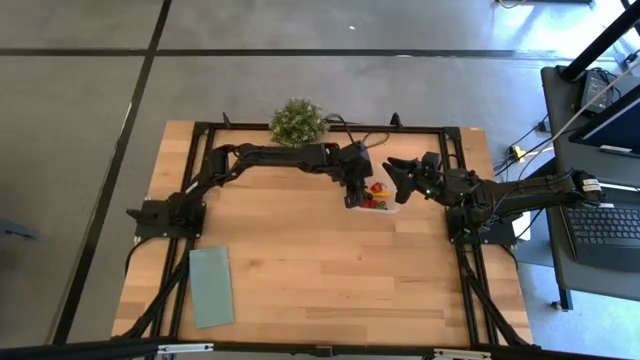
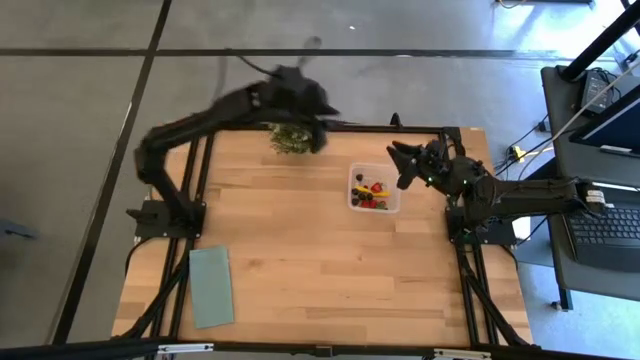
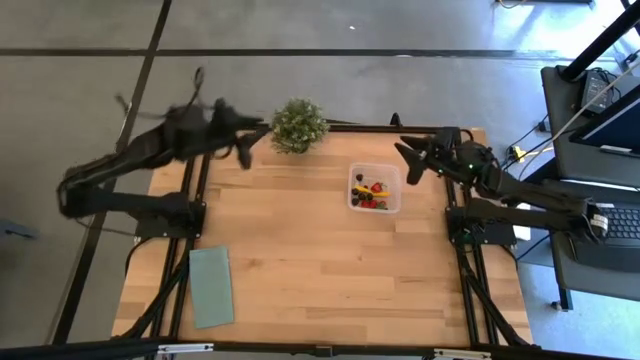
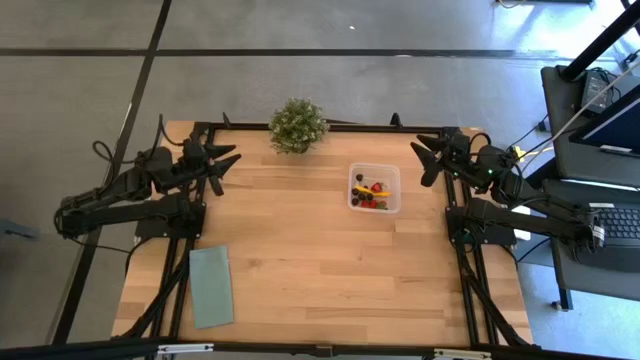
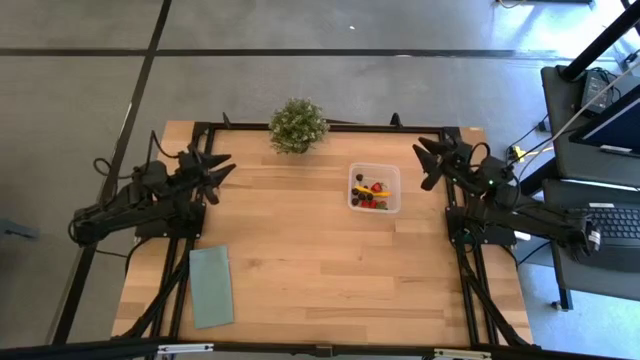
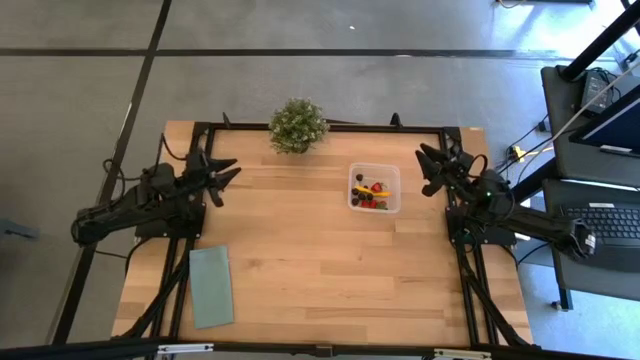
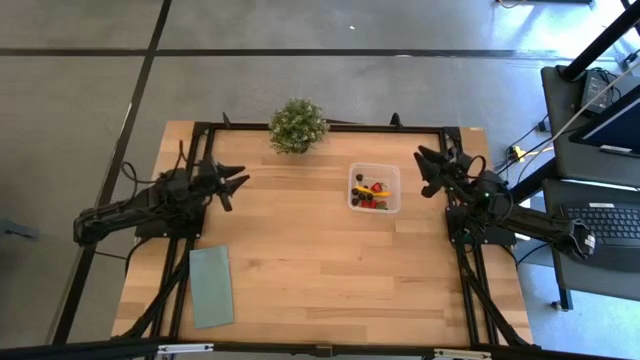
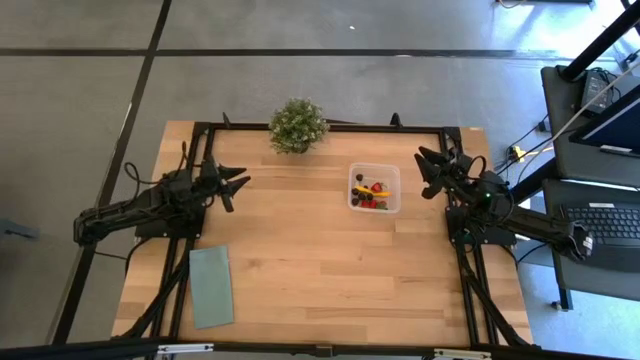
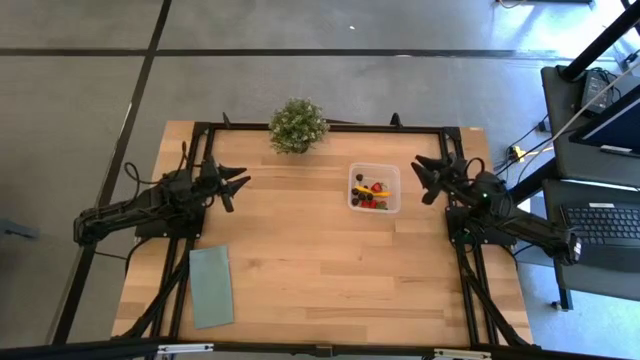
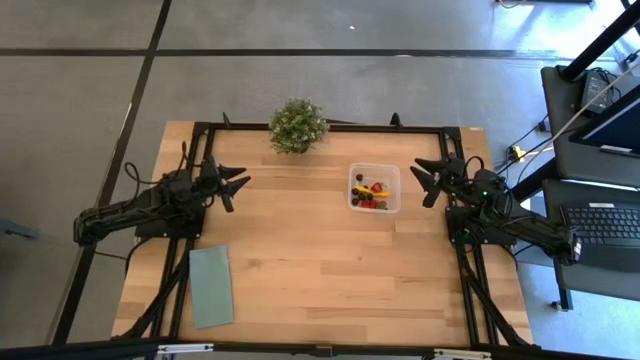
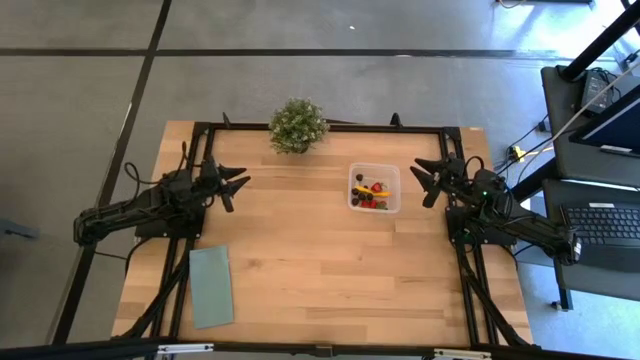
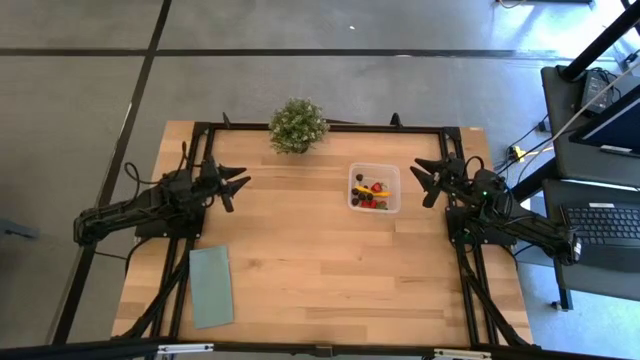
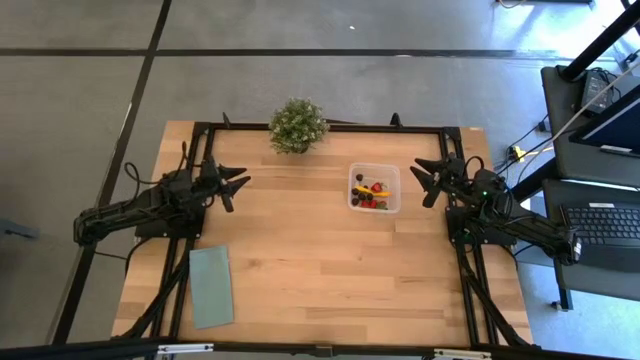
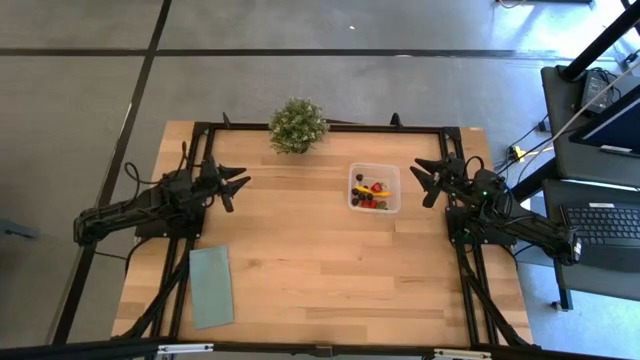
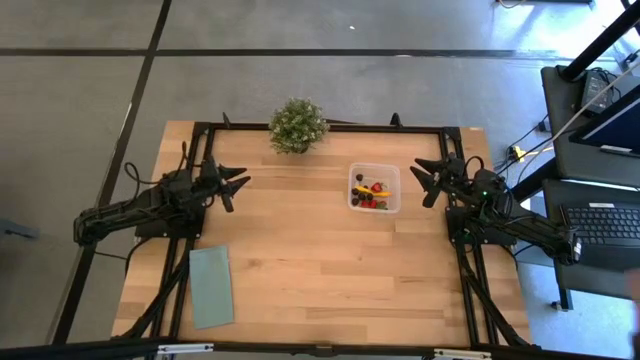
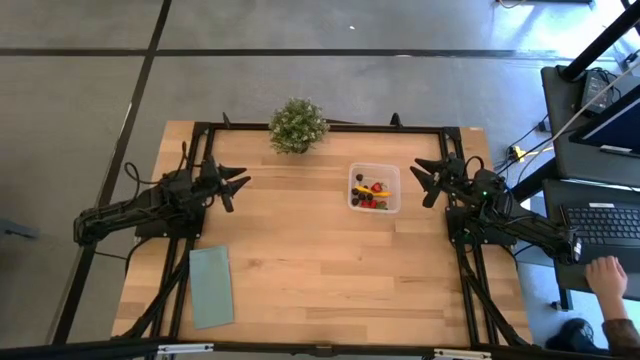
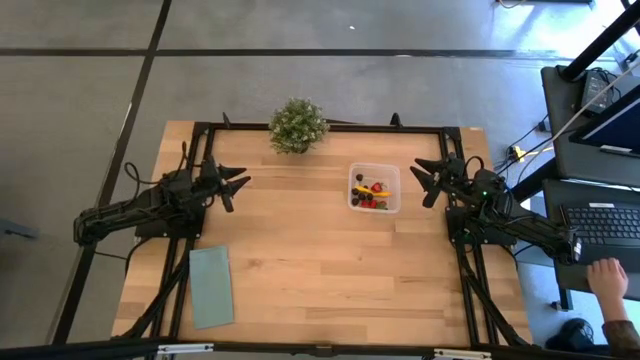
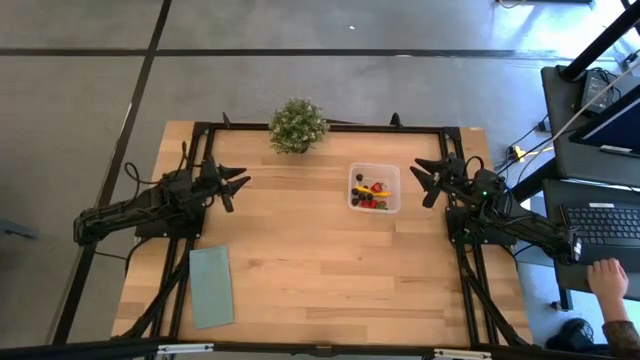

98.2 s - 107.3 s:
Task: Pick and placing Produce into tupperware
Return to Home Position

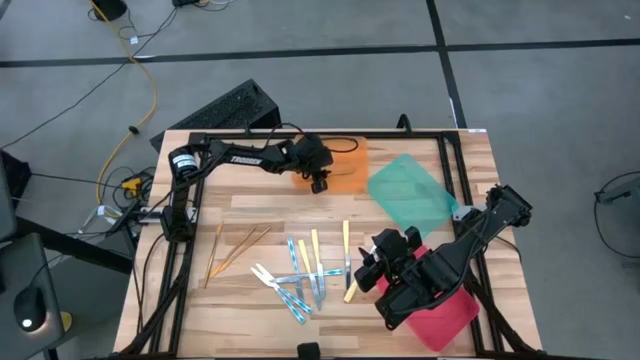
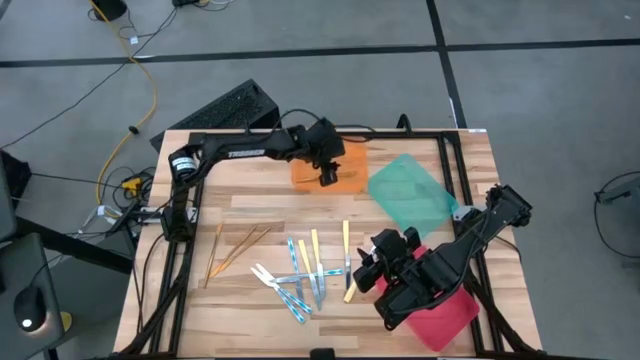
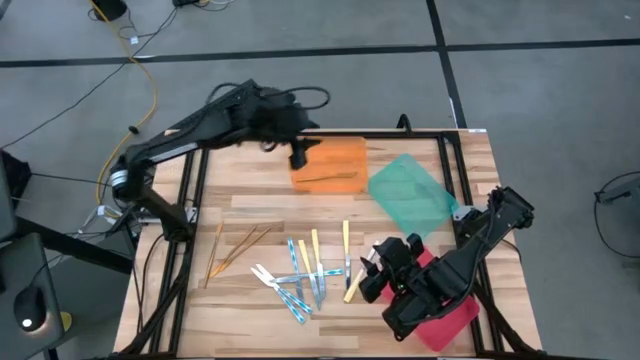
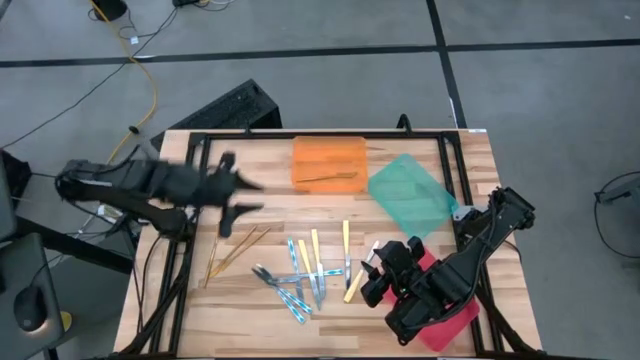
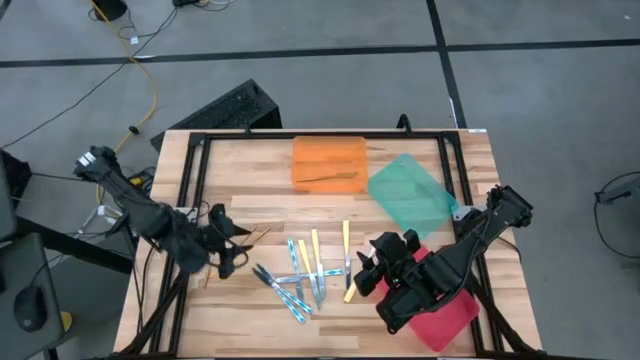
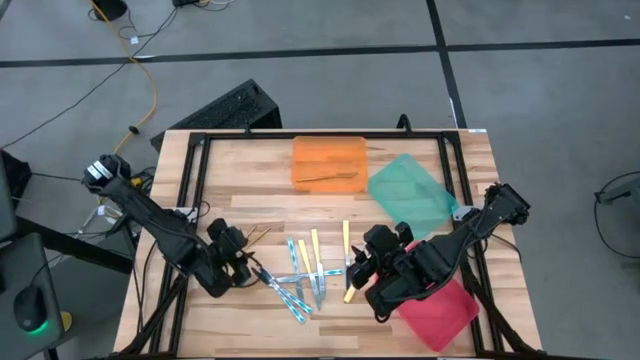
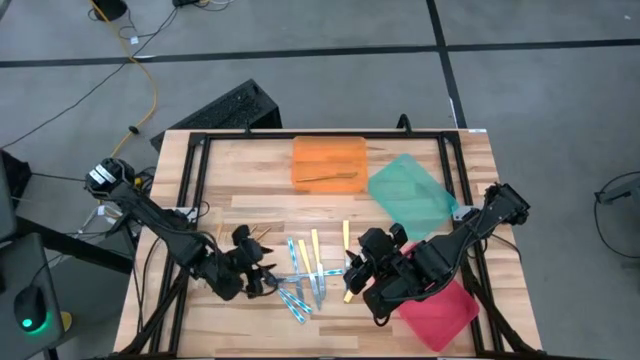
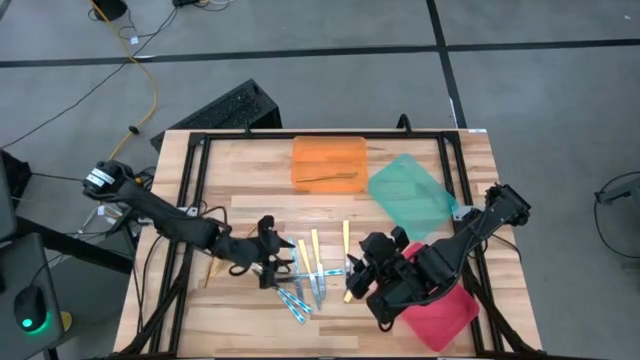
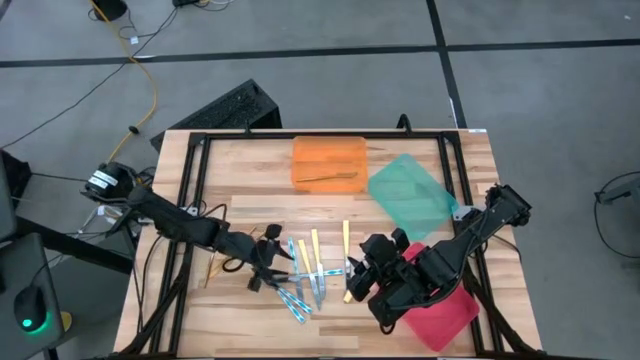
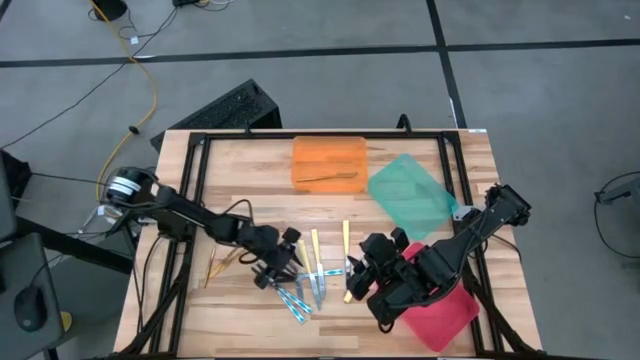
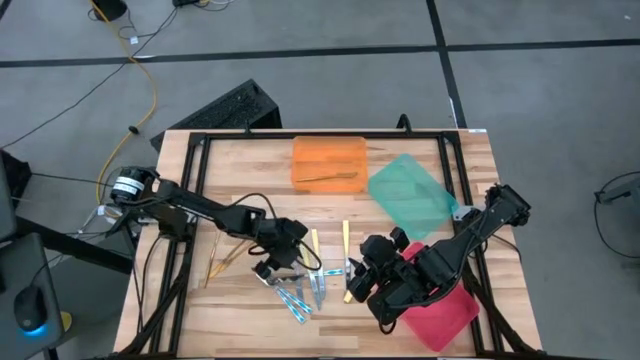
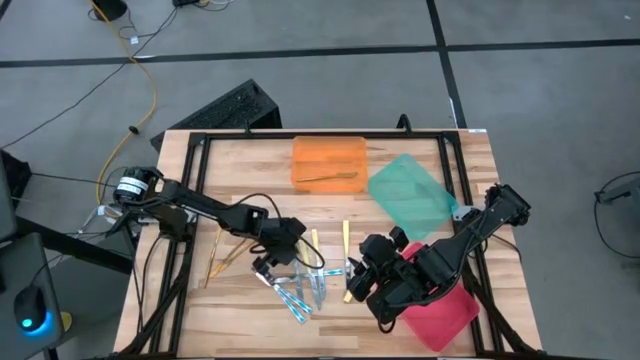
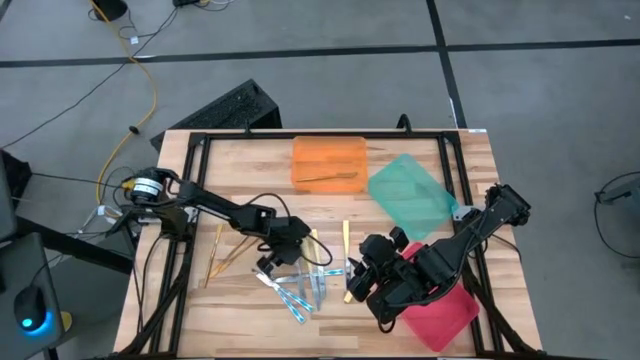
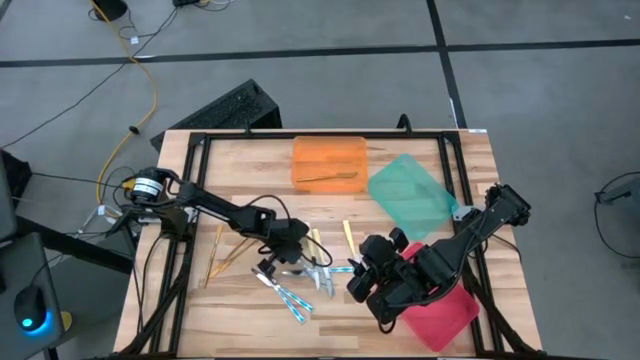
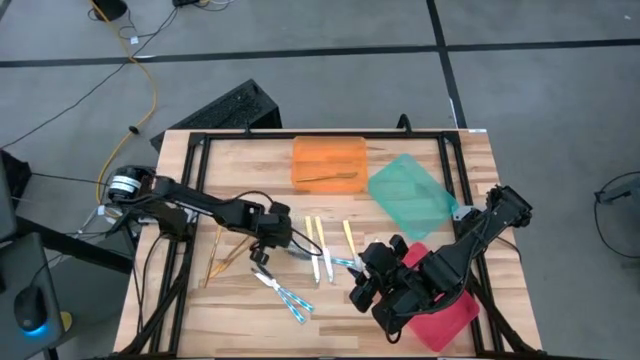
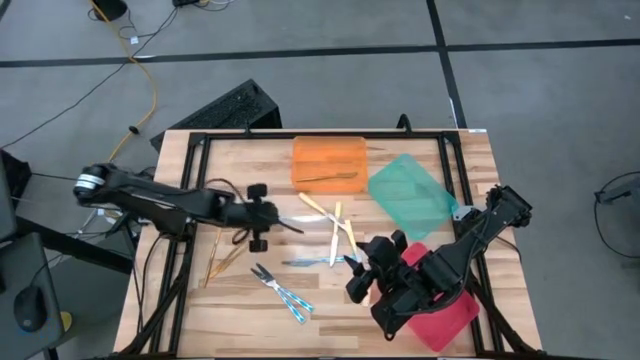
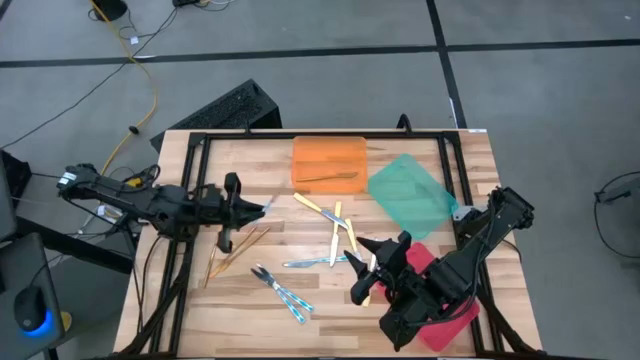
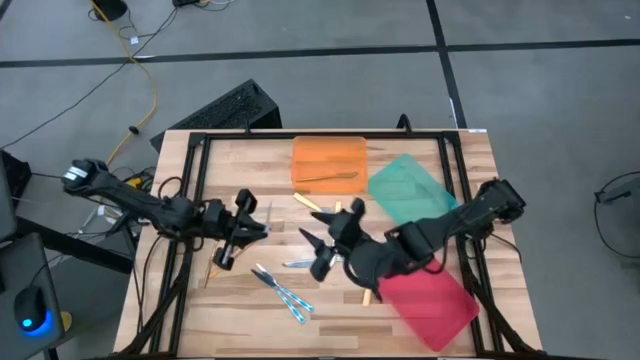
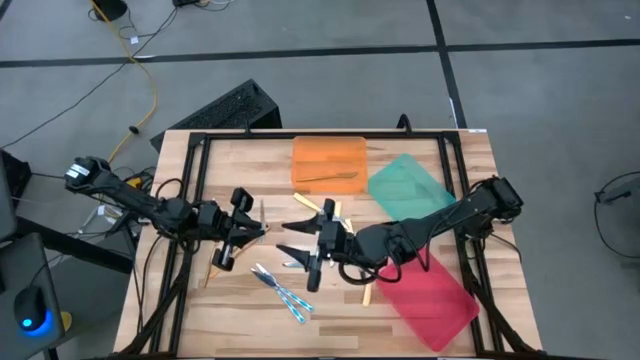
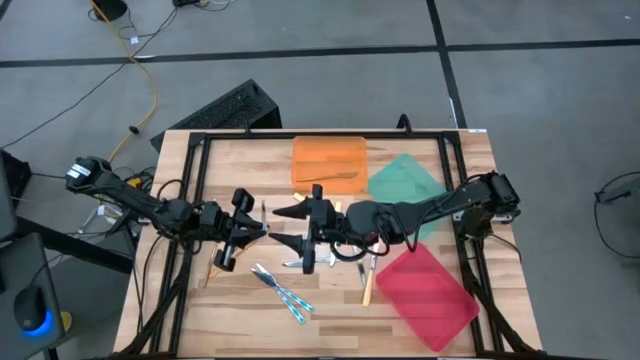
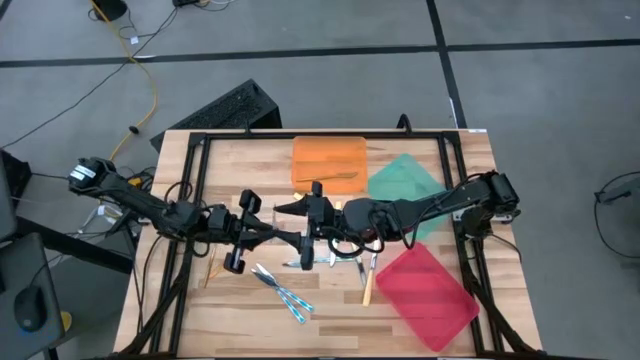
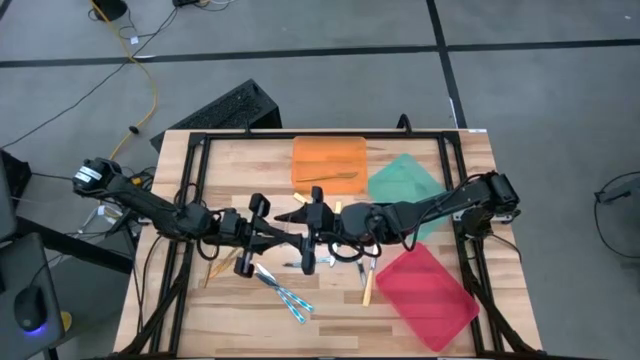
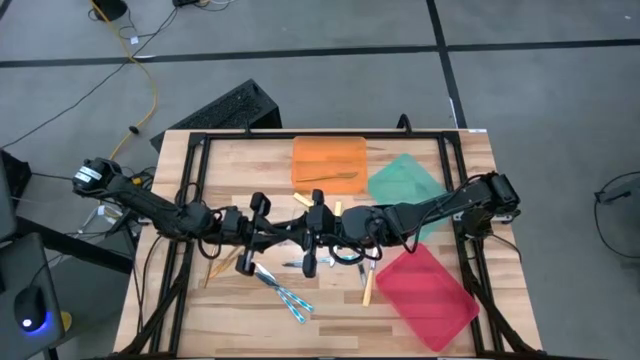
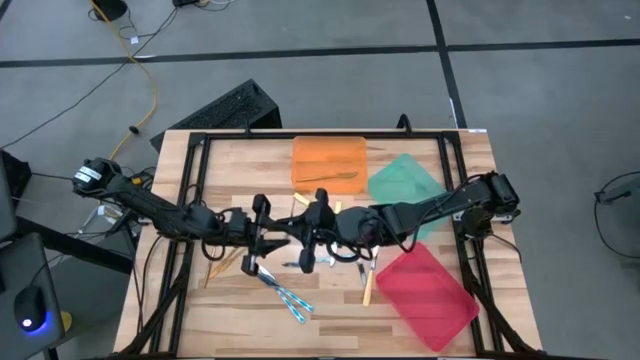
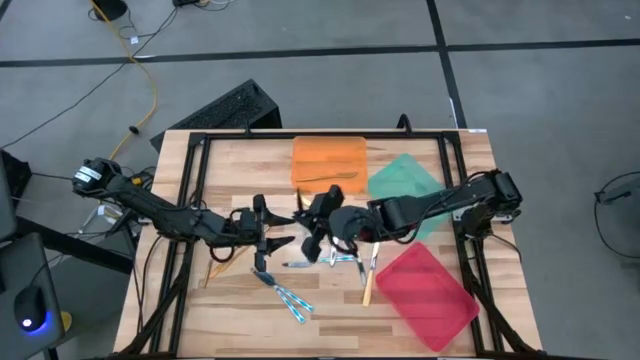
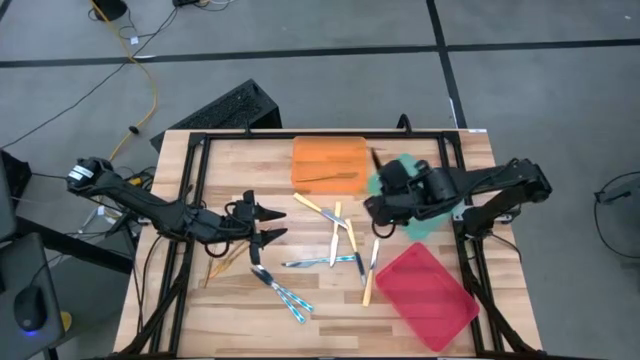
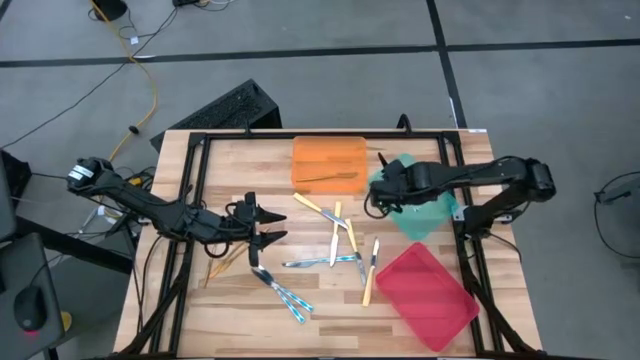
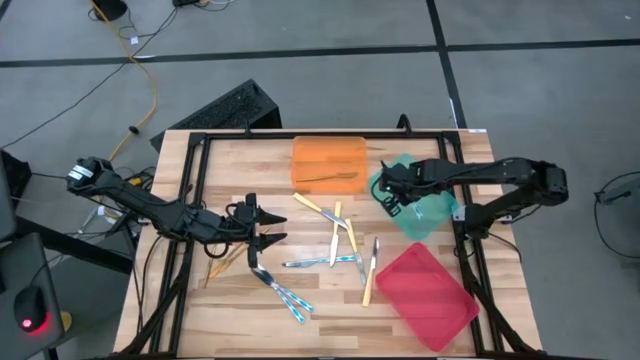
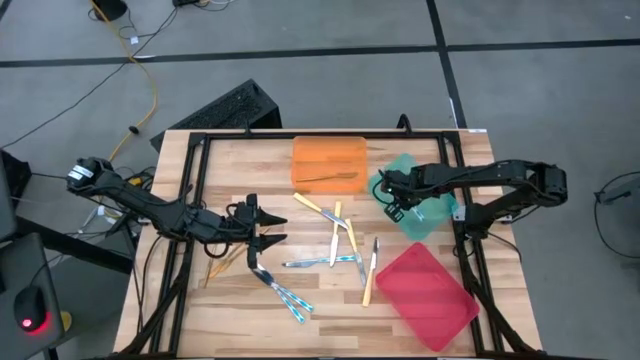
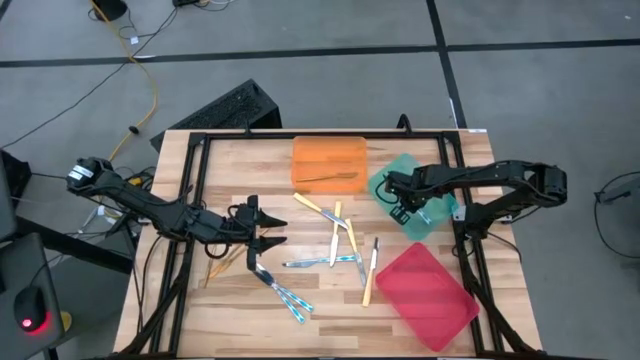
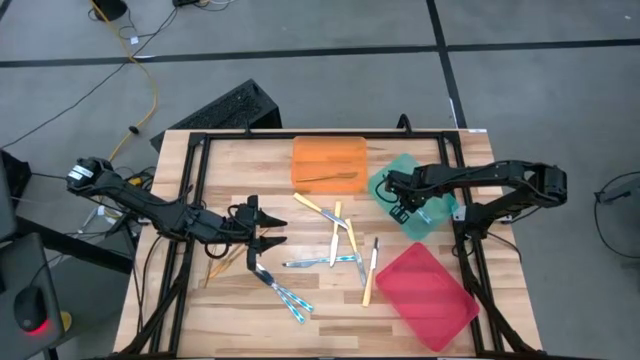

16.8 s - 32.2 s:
Task: Sort silverware by color (type)
Put the white patterned knife into the blue bin
